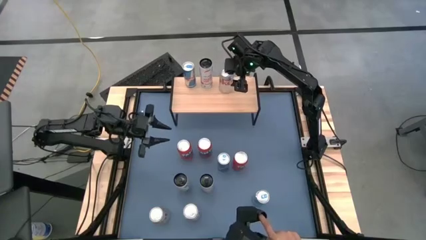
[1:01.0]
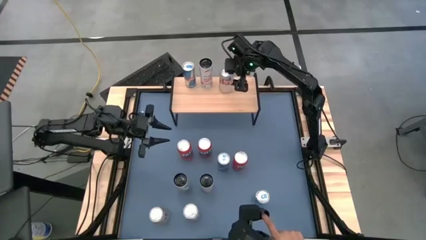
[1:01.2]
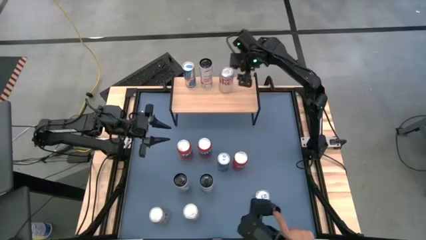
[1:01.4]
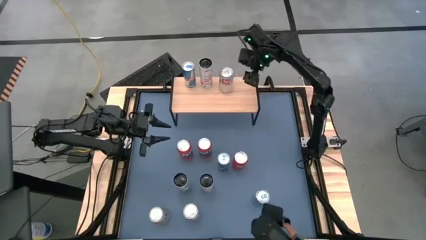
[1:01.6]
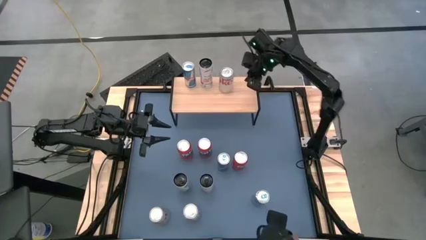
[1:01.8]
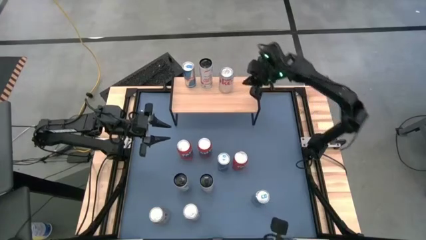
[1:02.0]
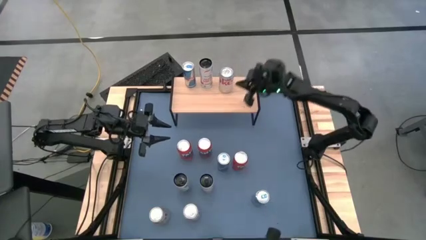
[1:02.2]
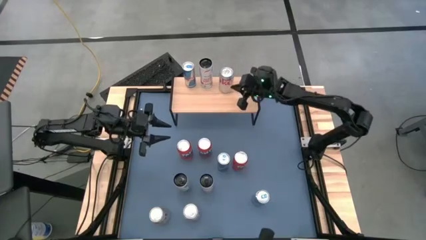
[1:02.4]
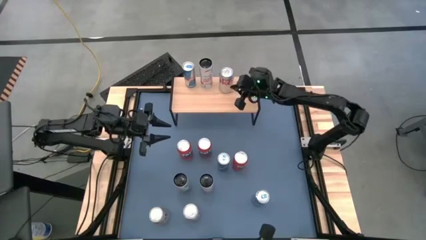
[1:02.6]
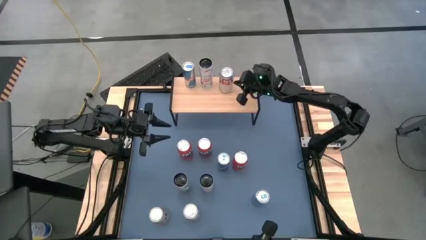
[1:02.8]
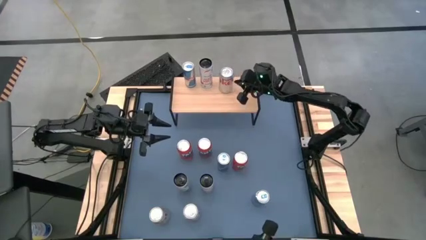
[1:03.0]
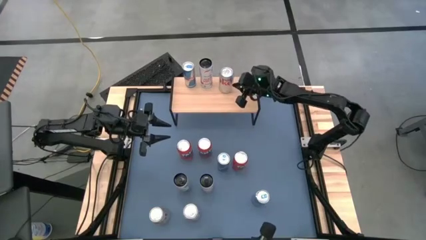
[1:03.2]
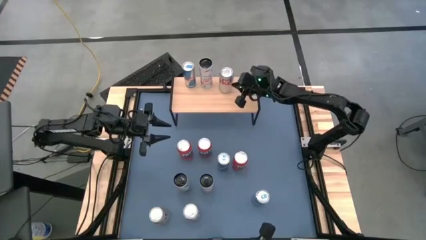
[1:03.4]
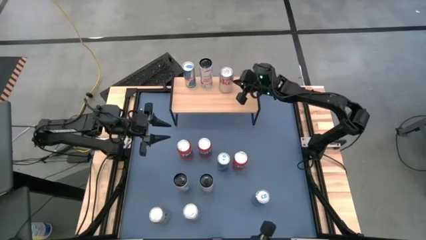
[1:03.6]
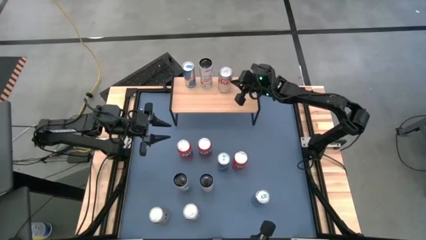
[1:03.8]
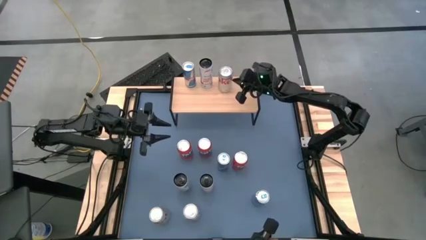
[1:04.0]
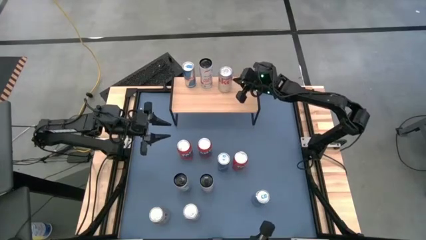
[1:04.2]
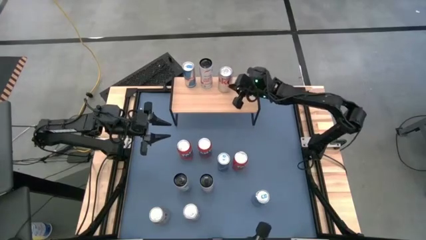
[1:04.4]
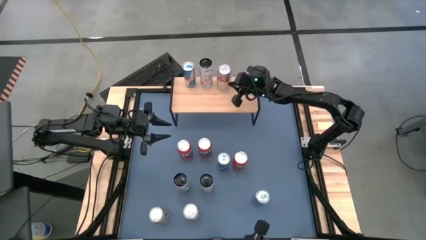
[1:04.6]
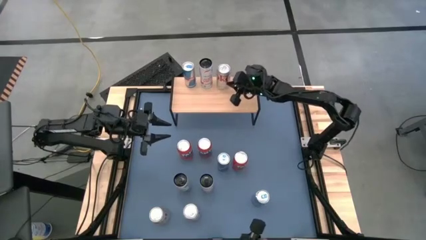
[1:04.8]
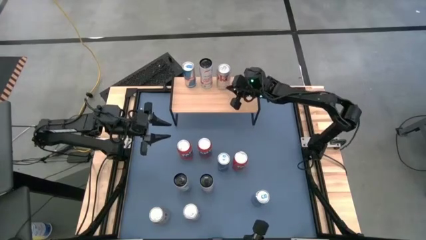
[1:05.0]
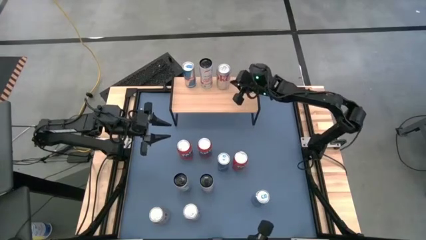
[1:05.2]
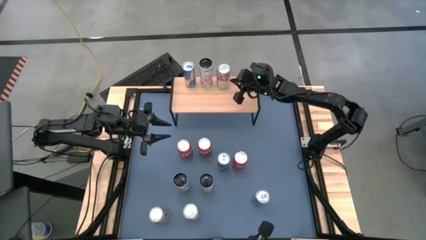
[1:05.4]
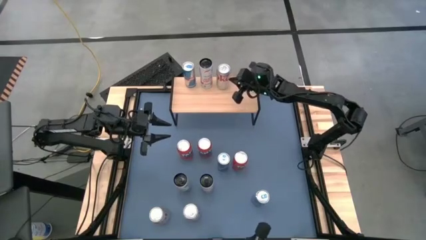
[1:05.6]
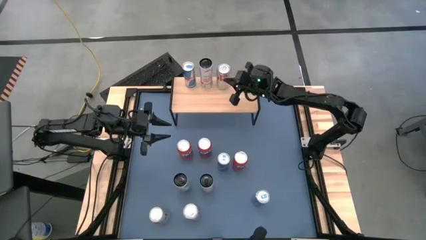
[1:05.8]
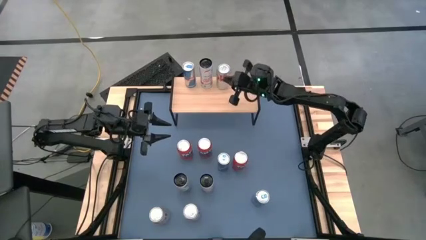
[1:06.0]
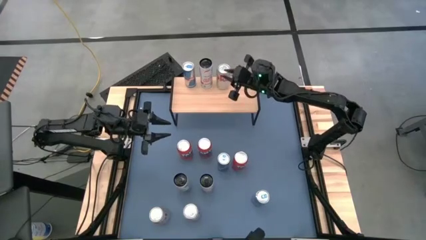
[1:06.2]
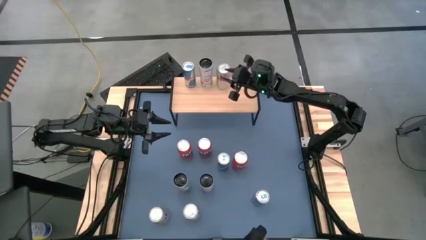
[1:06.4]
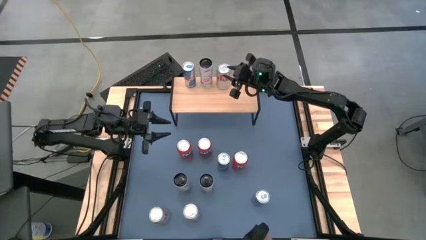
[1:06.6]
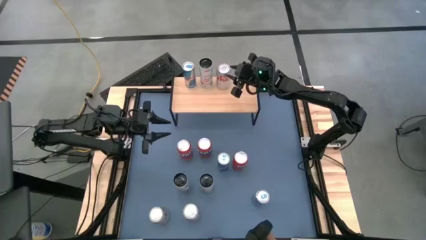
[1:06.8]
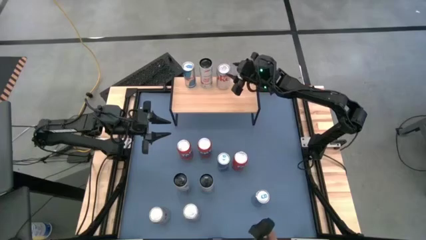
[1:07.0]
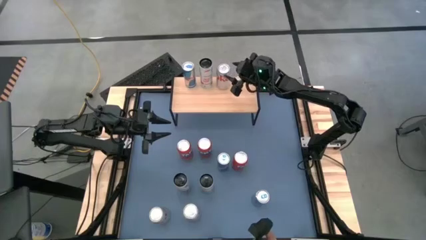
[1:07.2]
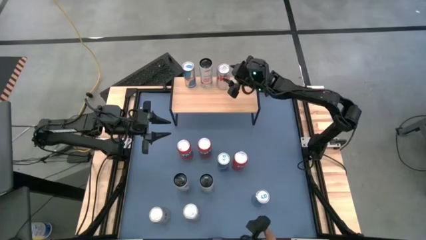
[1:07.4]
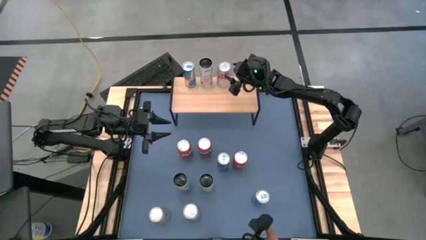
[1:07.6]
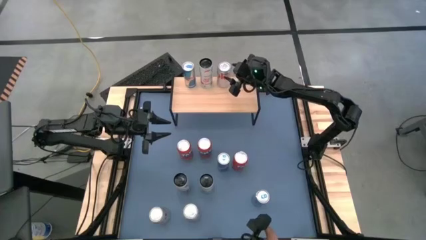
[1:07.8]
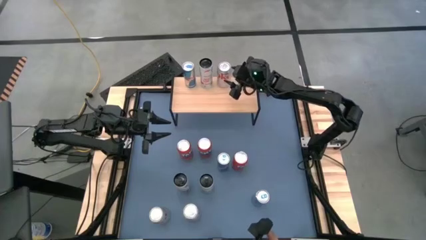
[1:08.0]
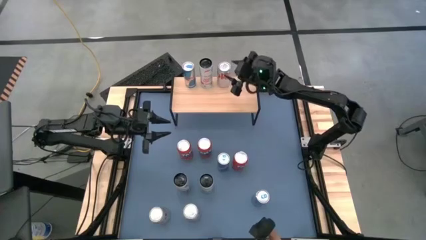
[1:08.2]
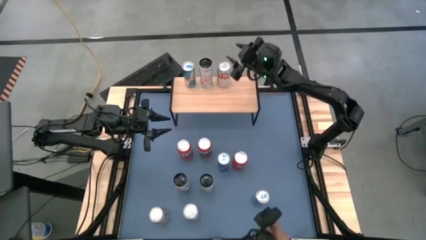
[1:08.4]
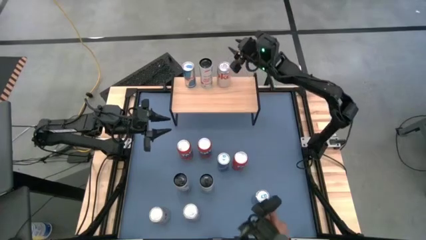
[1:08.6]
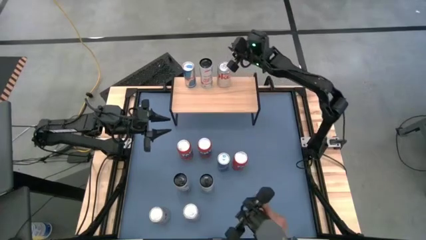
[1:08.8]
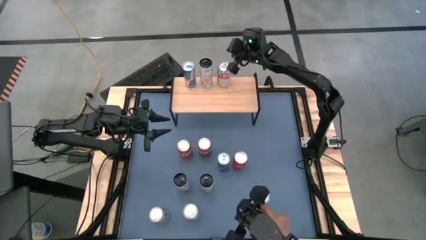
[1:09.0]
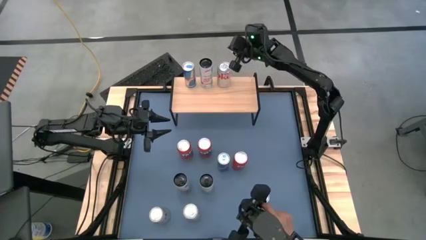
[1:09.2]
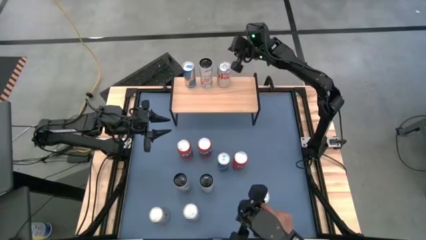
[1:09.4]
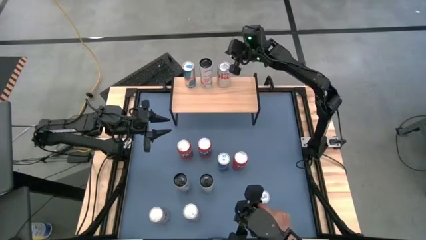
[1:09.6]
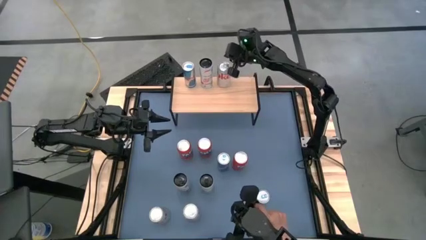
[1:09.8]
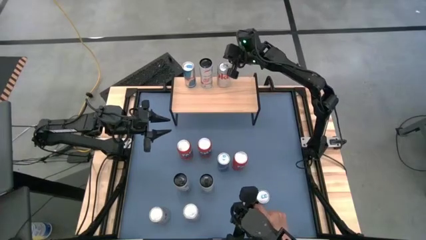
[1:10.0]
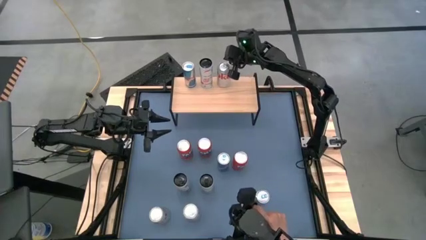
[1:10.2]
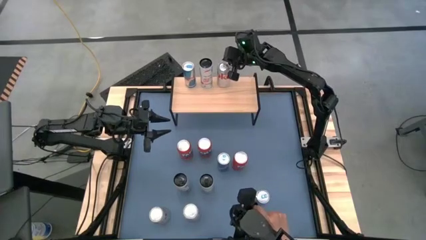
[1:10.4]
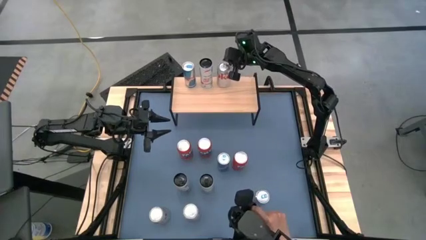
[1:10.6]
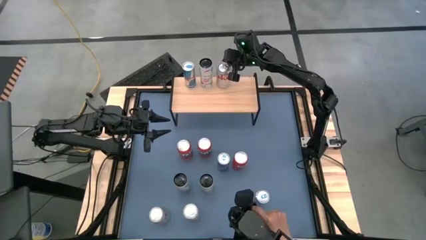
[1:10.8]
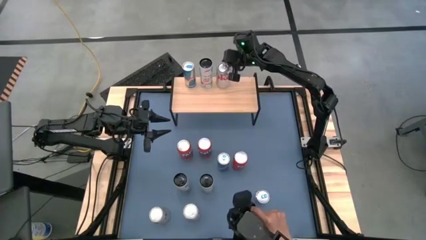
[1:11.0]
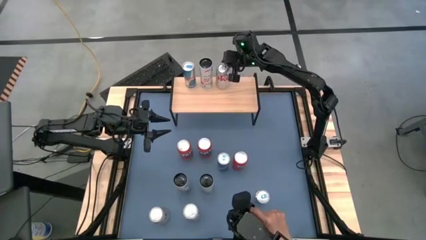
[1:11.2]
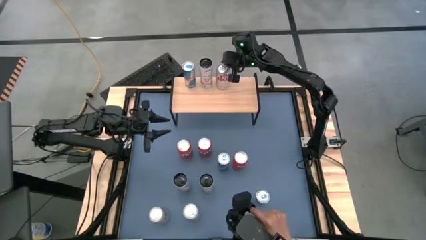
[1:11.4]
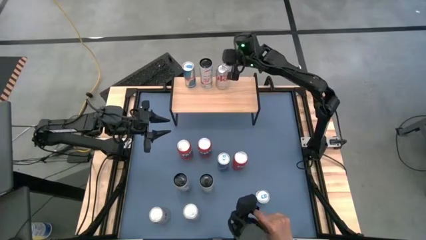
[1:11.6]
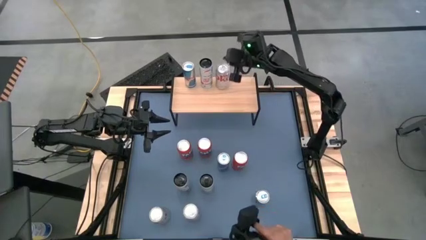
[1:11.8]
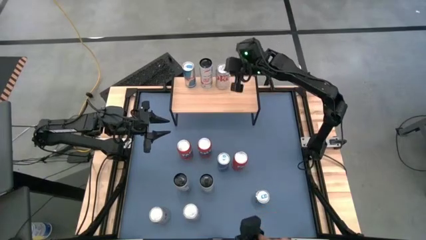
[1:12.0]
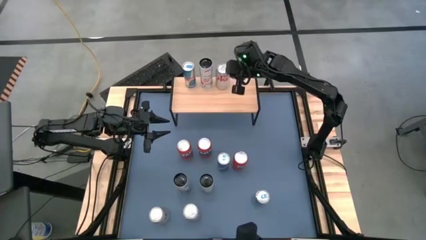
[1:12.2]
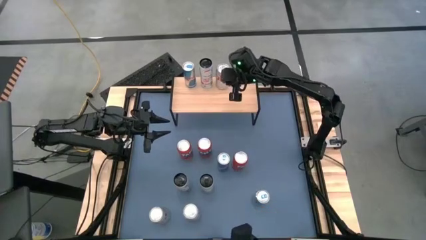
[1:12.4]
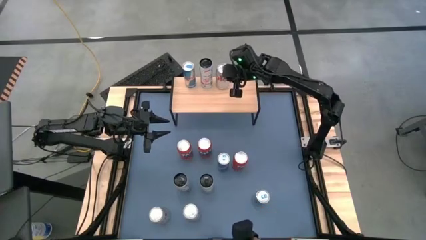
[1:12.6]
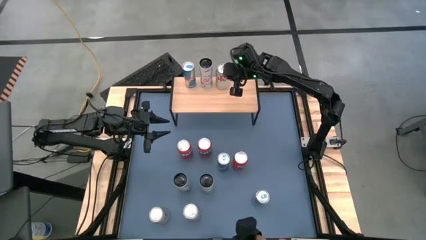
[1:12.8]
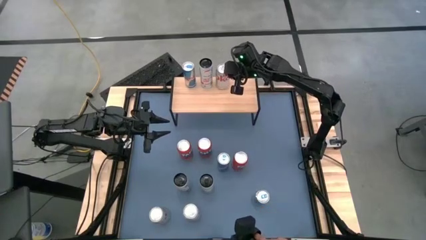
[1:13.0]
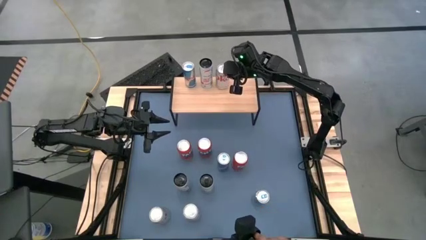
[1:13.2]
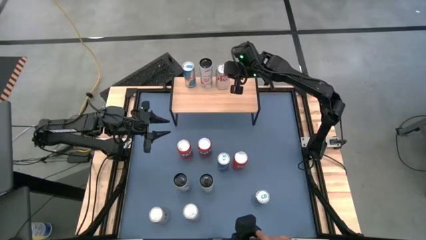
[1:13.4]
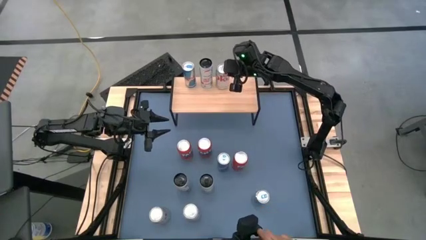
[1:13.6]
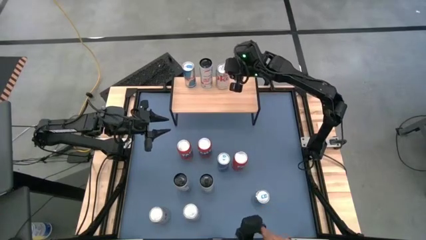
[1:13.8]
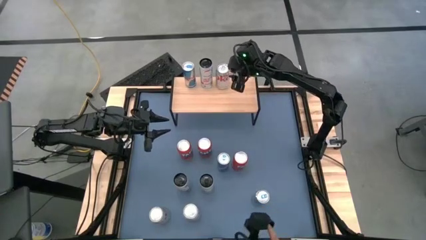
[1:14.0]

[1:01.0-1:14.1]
Task: Place canned beverage on shelf
Put the right silver soda can on the shelf
